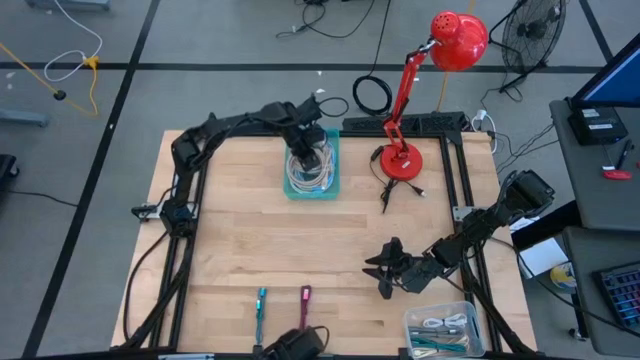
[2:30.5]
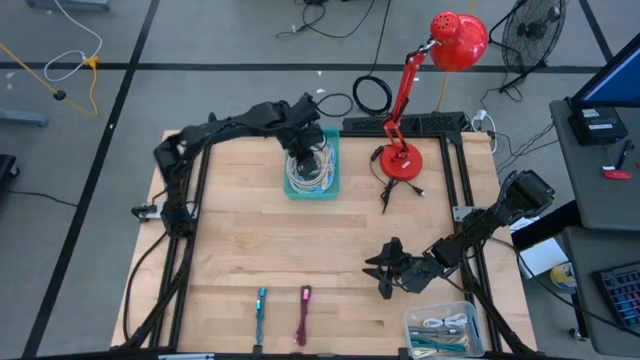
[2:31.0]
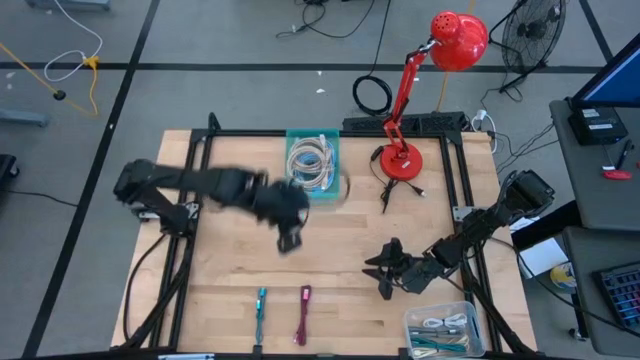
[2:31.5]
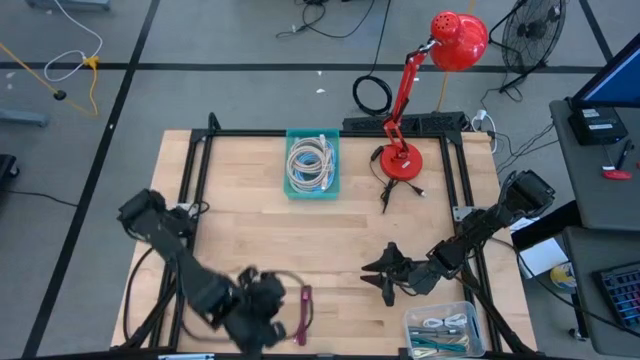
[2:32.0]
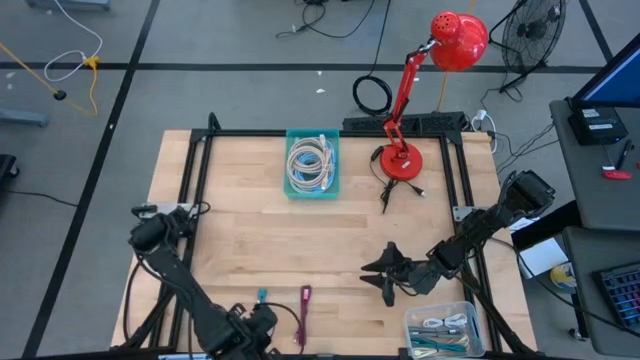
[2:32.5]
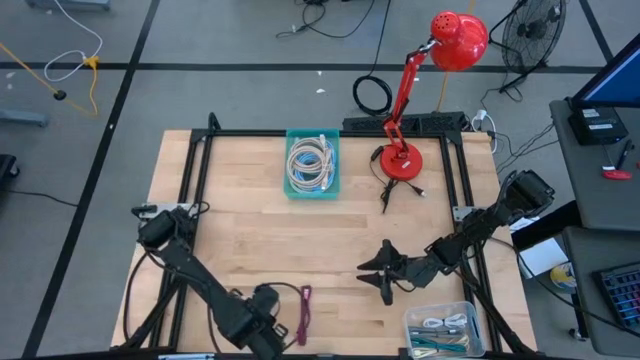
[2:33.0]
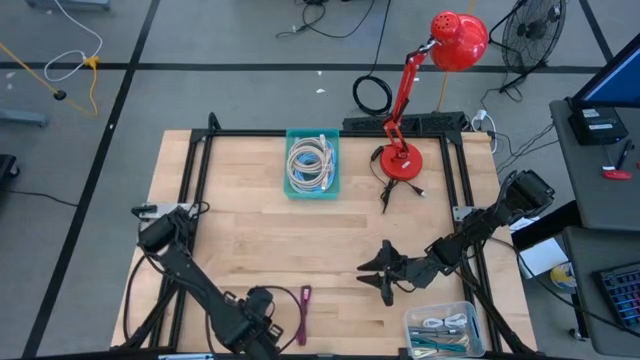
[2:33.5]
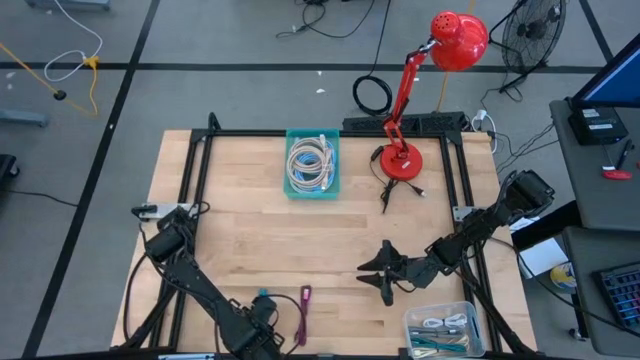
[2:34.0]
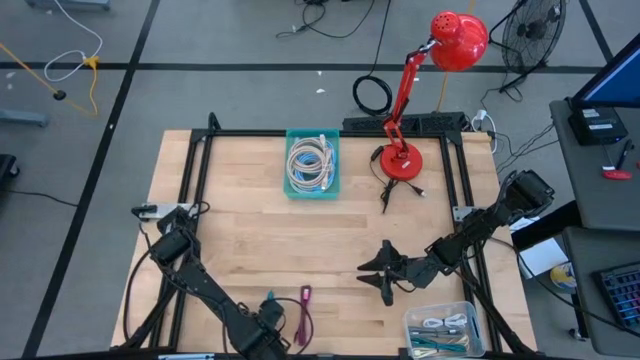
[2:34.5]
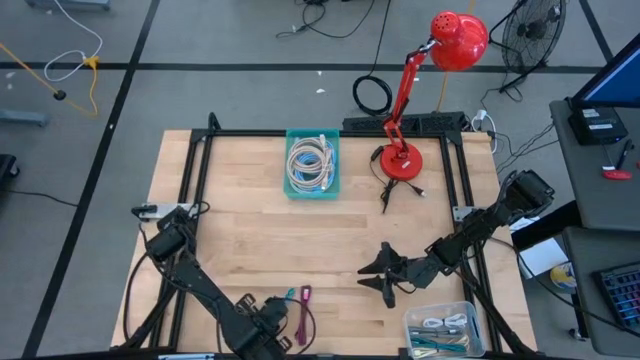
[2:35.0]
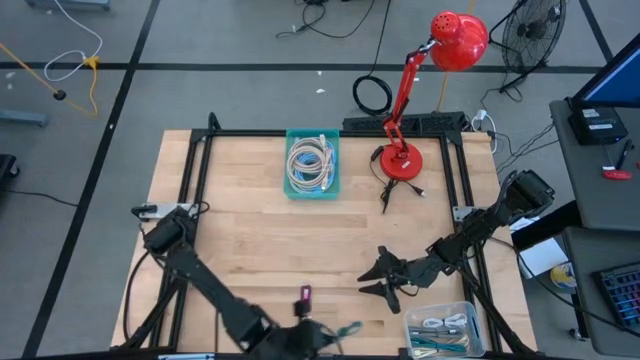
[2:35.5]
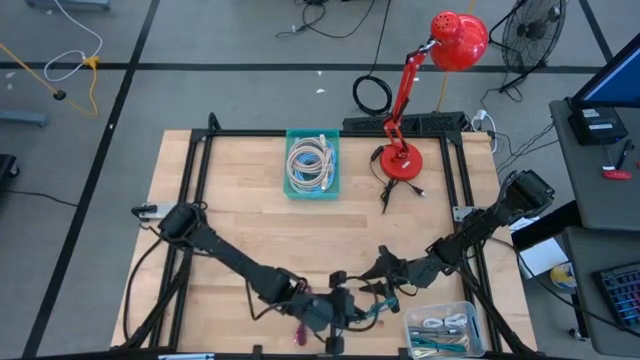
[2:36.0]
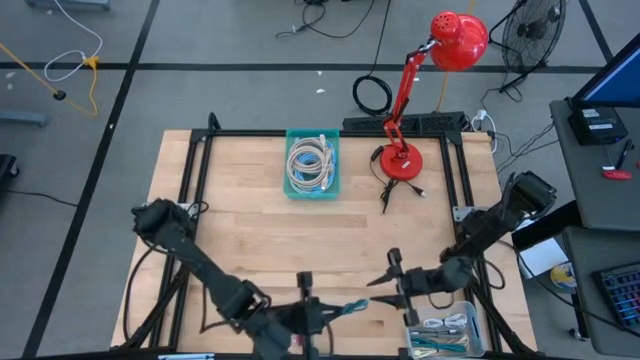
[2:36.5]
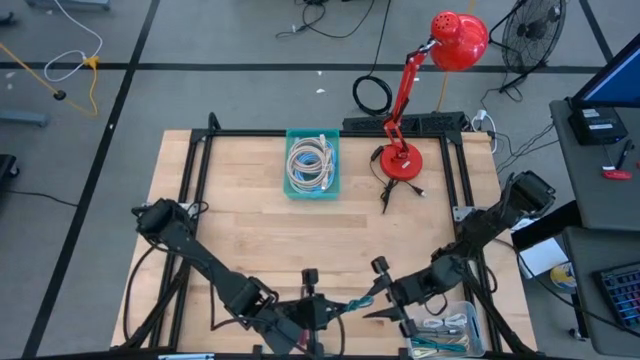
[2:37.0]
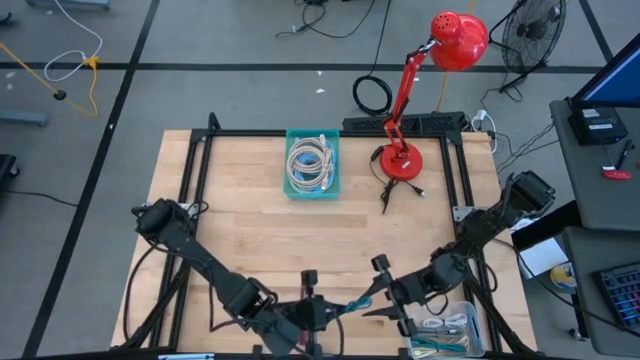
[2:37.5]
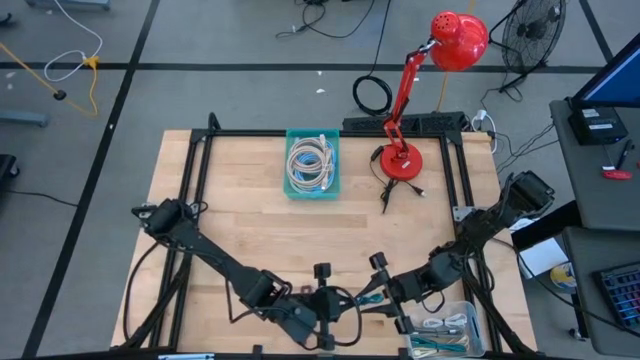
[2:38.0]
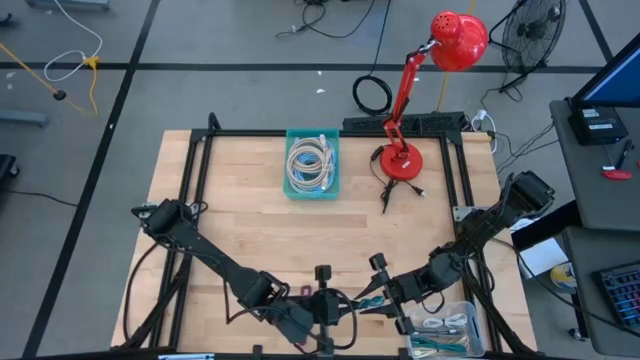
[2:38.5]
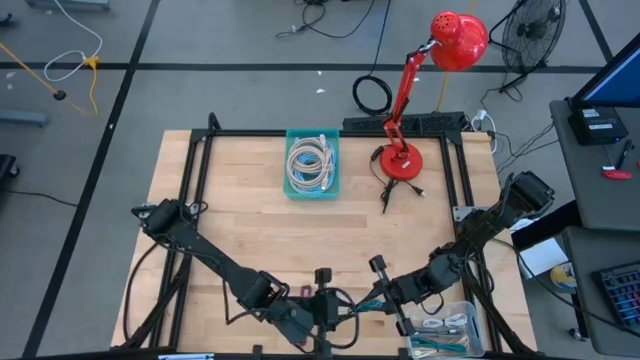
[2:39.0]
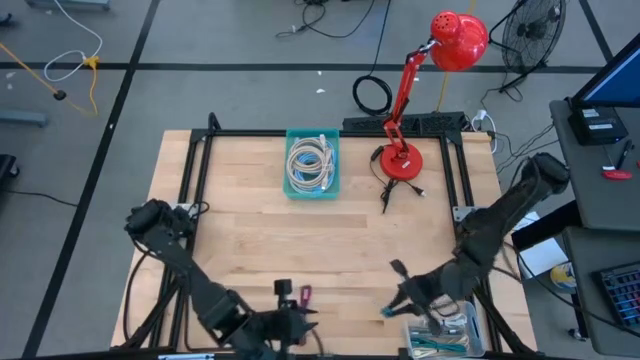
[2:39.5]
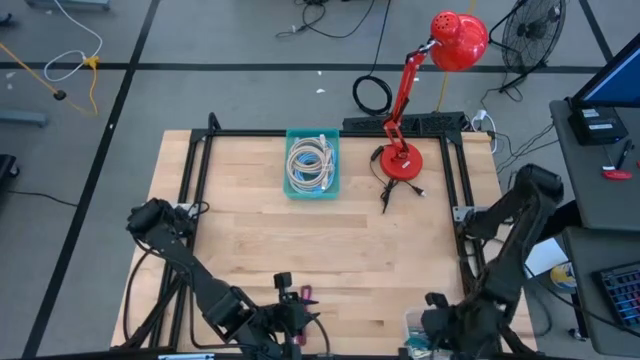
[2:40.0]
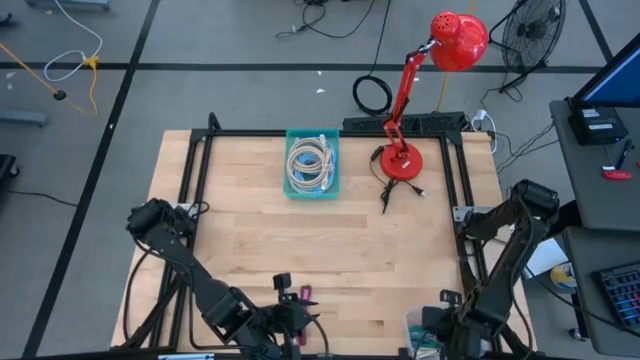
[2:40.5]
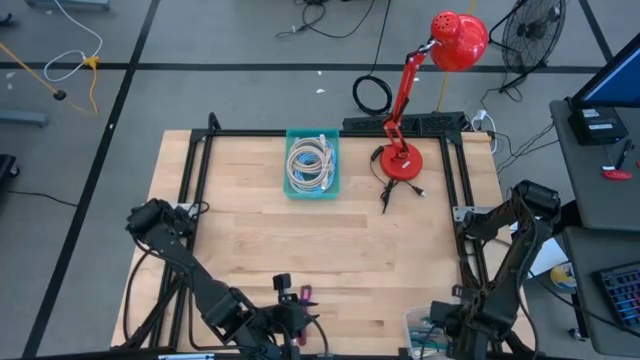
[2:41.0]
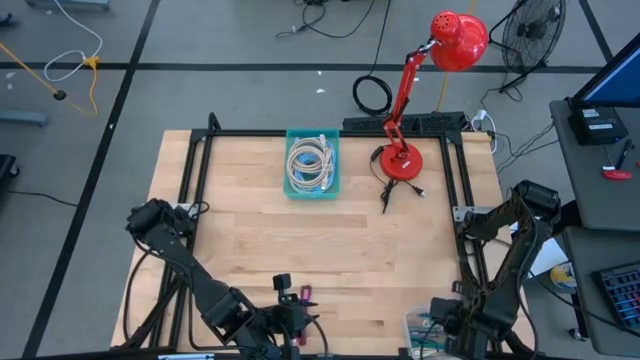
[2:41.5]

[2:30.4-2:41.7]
Task: Pick & Place USB Port
Put the blue USB cable into the transparent bin

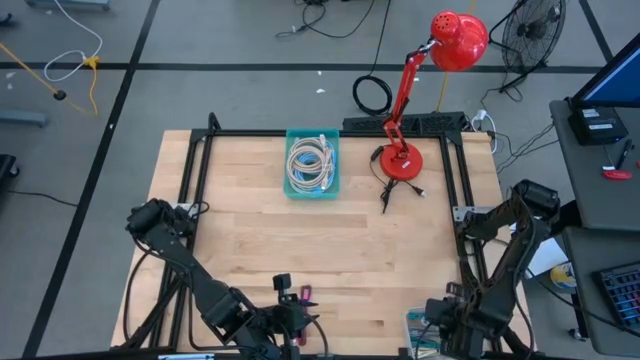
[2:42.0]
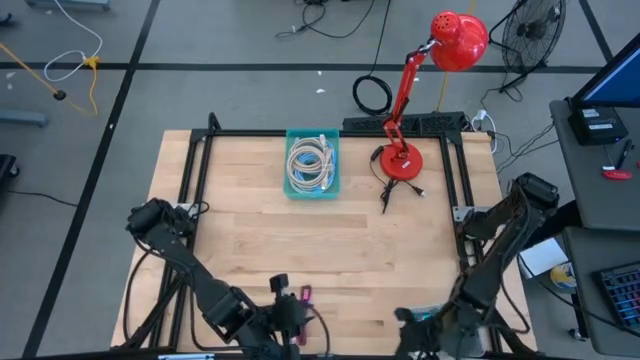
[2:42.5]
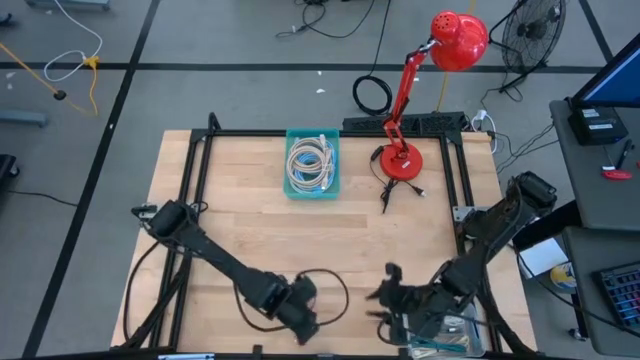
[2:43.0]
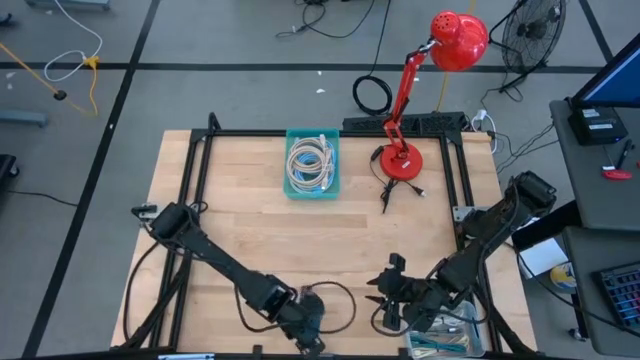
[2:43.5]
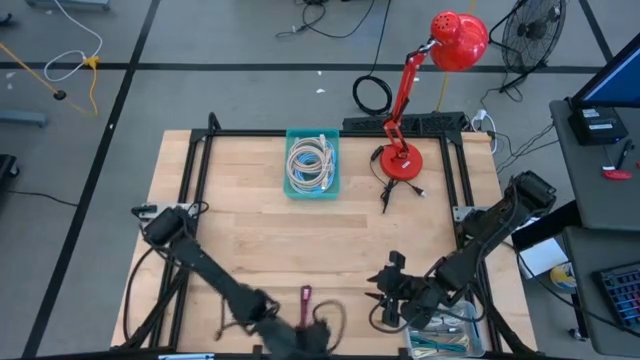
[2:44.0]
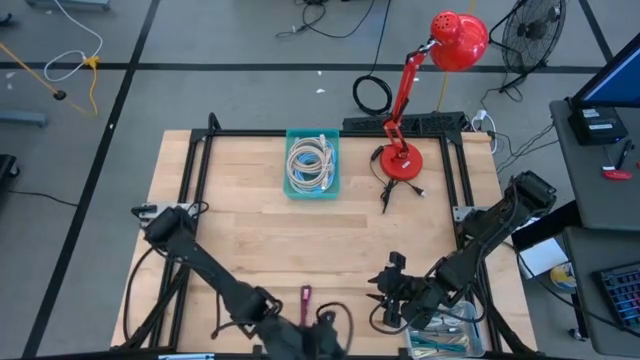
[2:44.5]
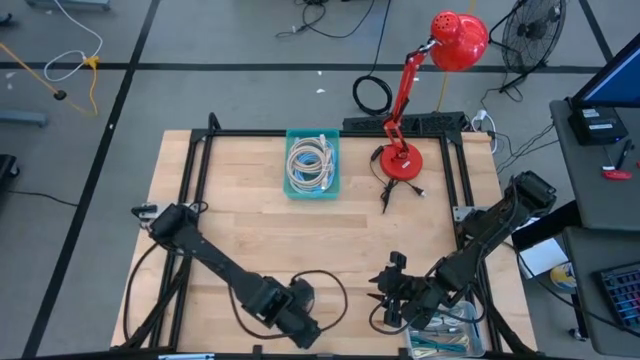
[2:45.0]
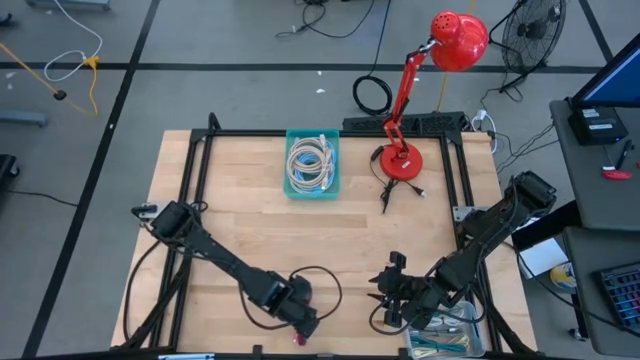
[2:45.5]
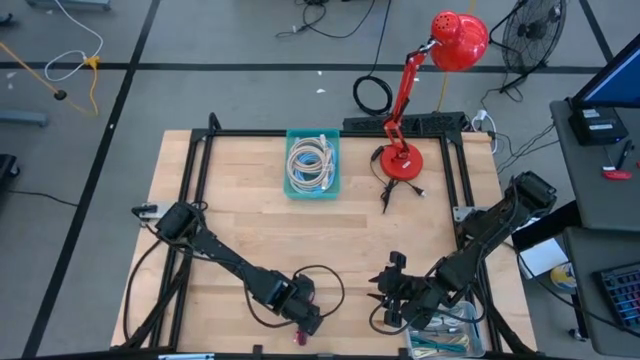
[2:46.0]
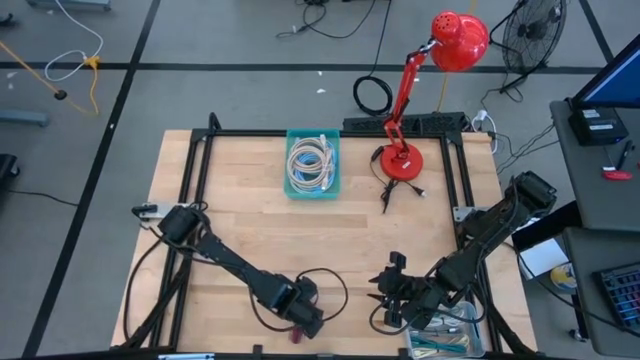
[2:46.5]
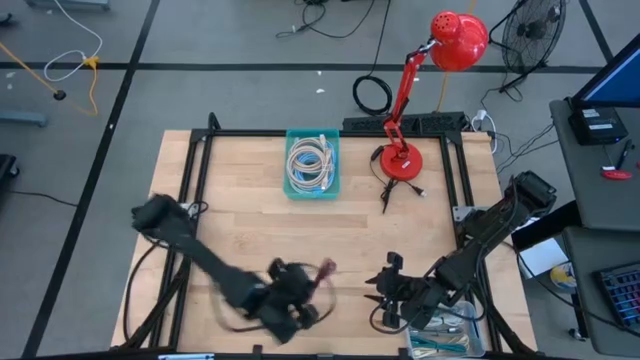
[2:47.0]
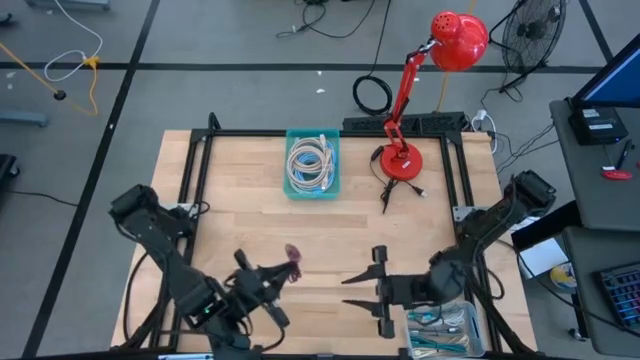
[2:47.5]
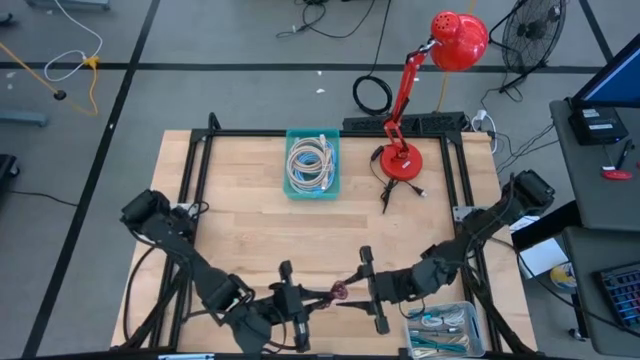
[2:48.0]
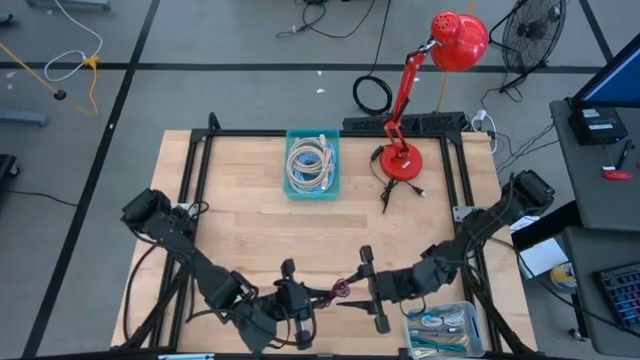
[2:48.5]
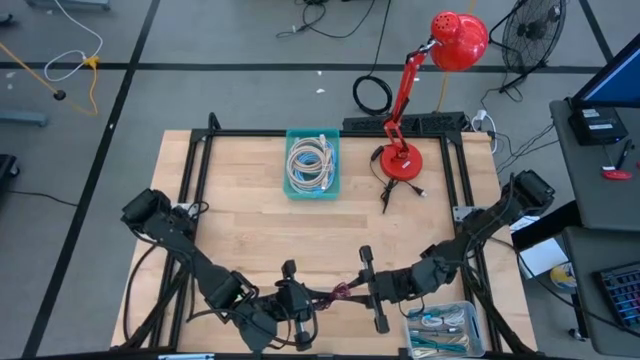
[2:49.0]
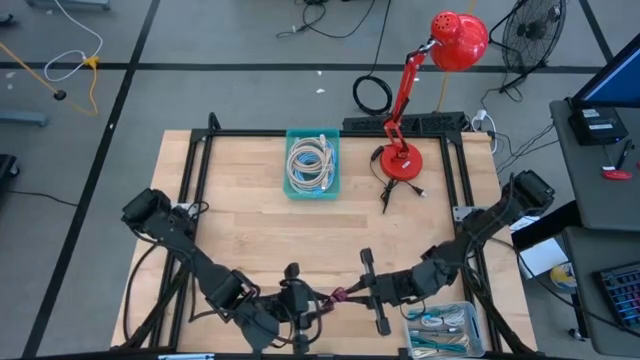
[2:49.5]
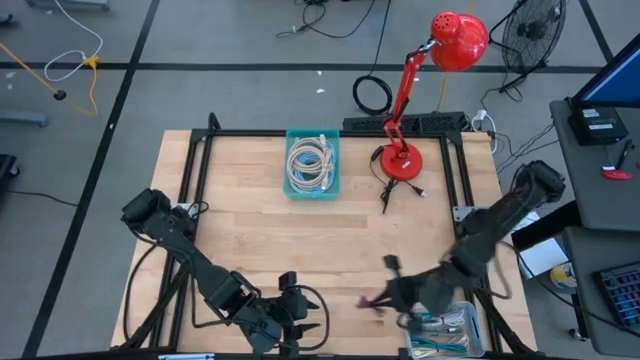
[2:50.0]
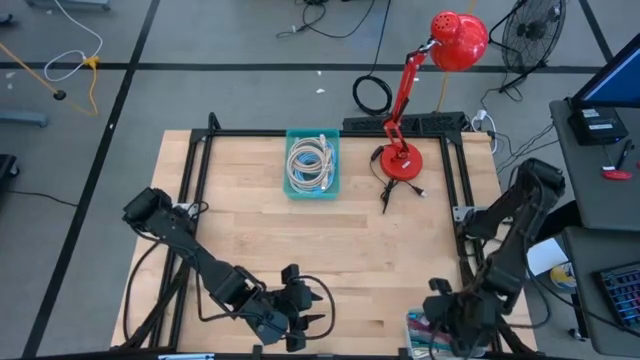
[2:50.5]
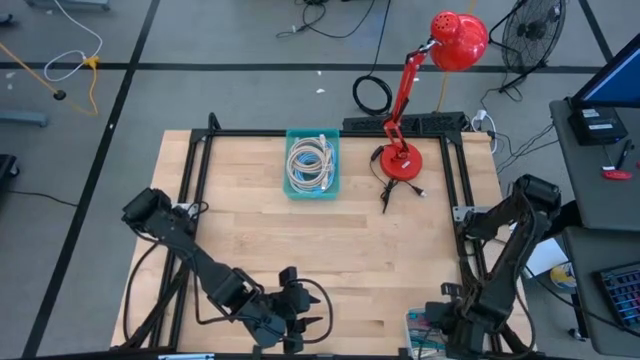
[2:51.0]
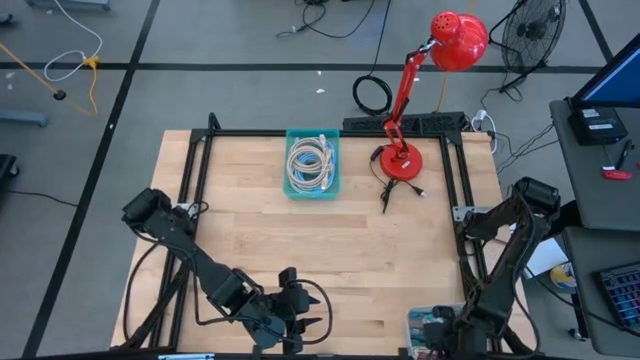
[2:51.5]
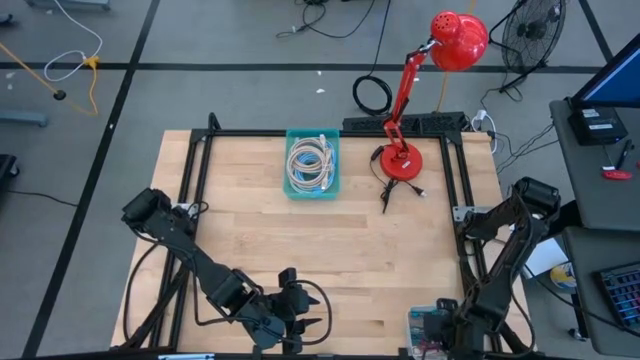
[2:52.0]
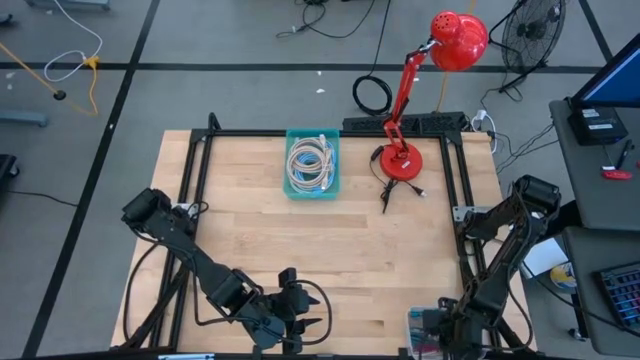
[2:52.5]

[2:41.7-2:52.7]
Put the pink USB cable into the transparent bin
